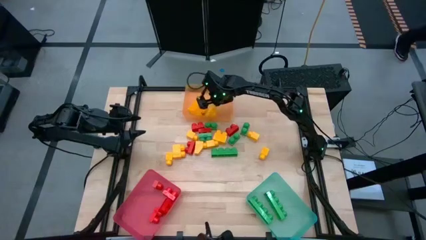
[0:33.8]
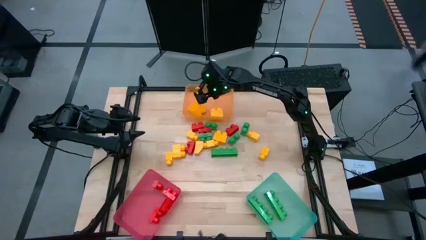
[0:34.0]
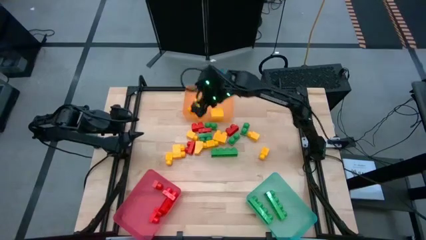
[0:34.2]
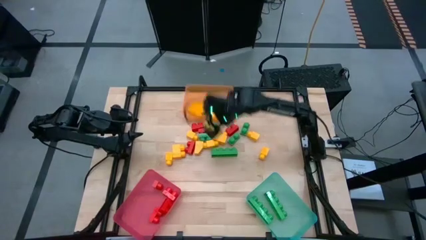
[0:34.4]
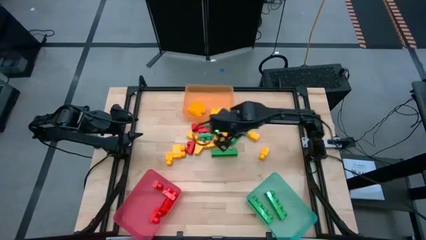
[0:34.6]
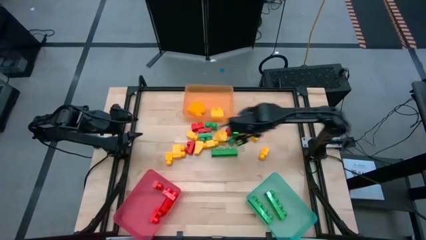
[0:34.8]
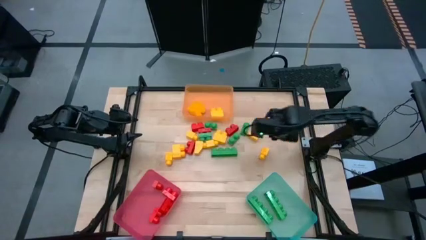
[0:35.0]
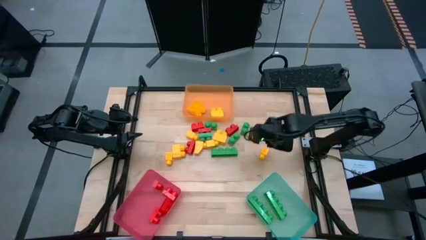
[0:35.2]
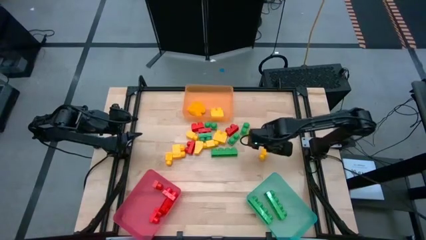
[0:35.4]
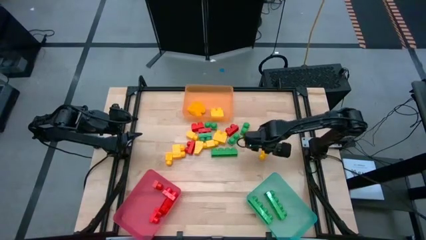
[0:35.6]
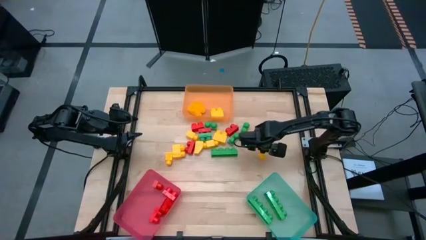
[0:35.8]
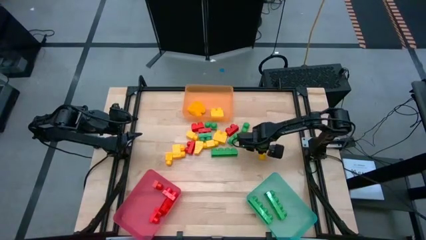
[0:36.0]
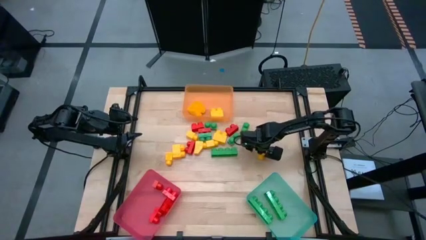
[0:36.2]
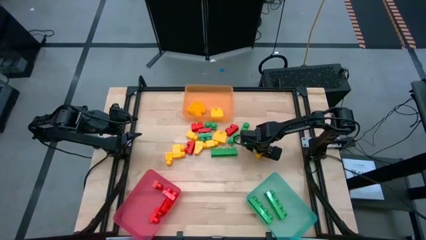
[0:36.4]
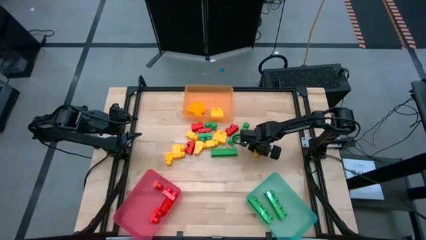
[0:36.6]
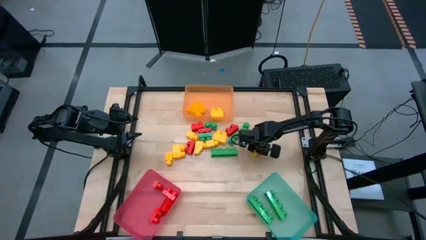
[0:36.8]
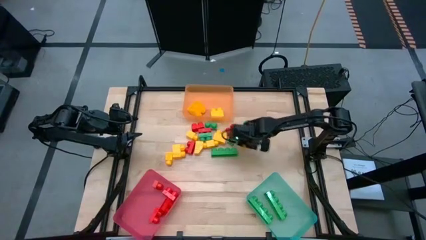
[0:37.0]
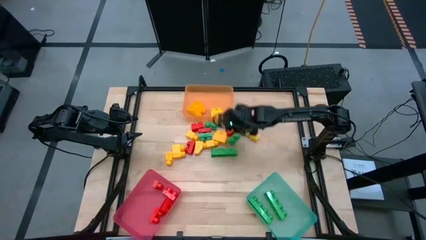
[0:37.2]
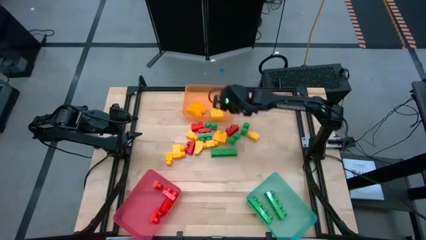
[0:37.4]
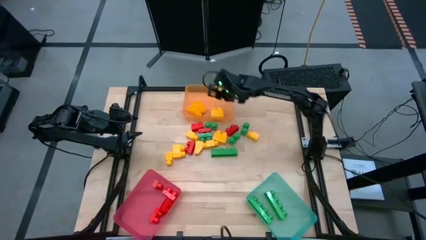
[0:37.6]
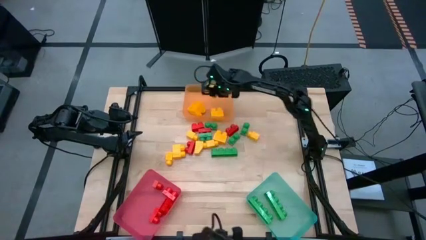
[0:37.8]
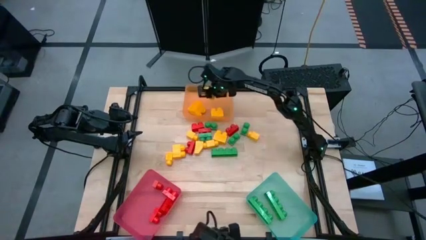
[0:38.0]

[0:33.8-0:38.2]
Task: Sort blocks
Put the yellow 1 stud game piece into the orange bin

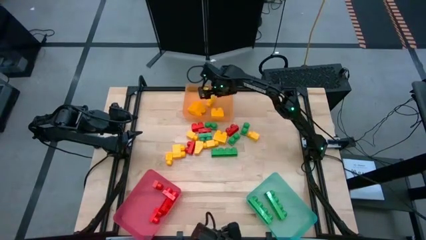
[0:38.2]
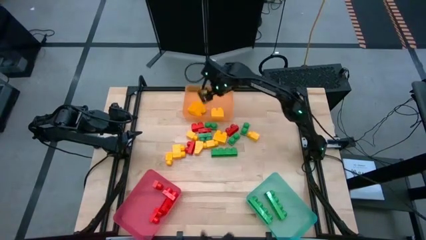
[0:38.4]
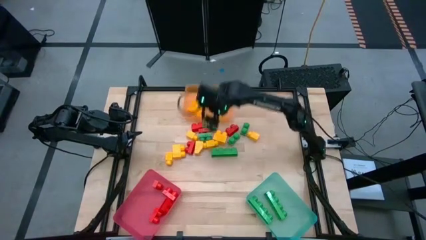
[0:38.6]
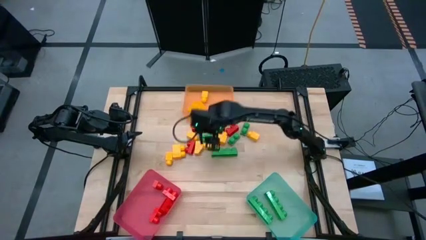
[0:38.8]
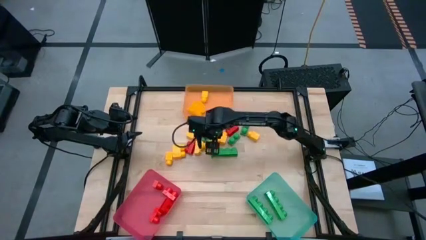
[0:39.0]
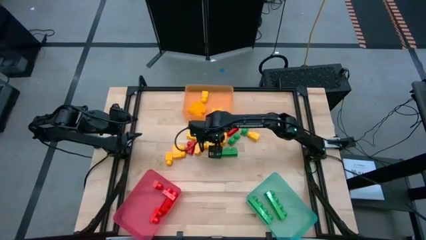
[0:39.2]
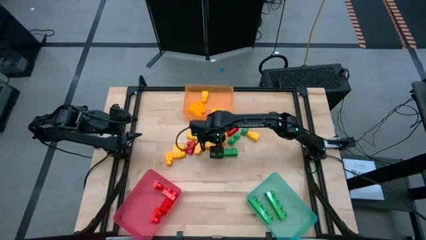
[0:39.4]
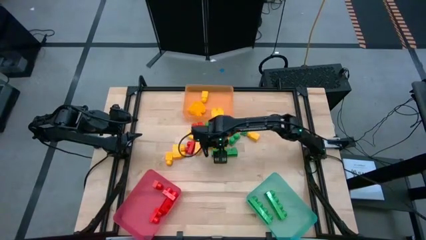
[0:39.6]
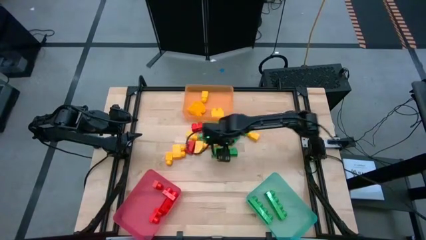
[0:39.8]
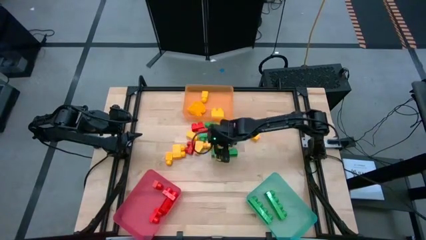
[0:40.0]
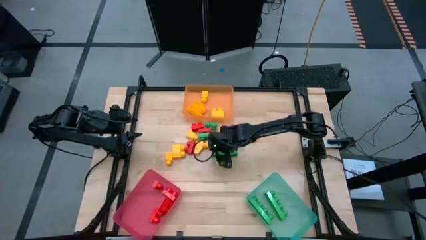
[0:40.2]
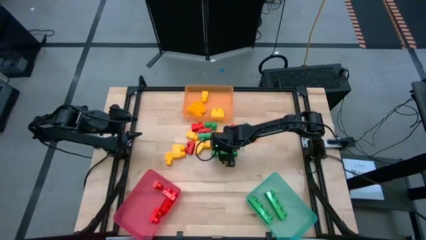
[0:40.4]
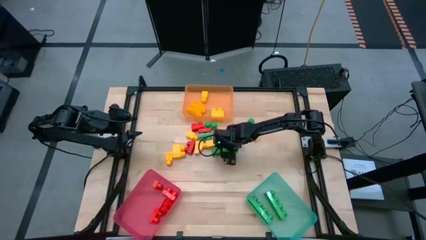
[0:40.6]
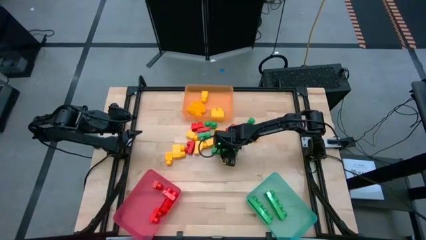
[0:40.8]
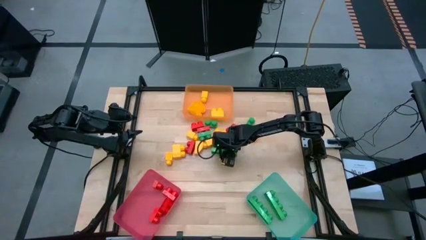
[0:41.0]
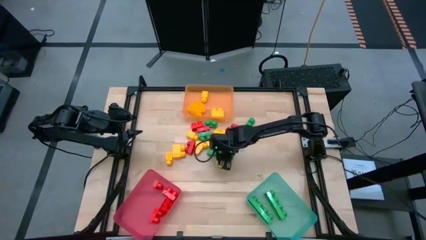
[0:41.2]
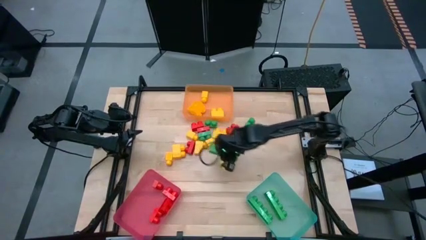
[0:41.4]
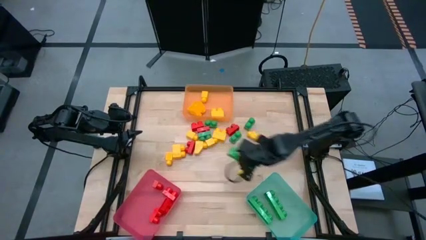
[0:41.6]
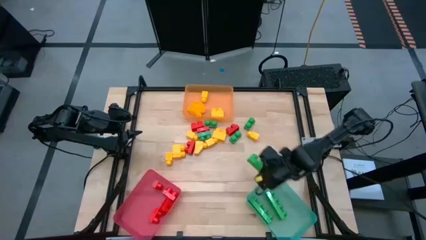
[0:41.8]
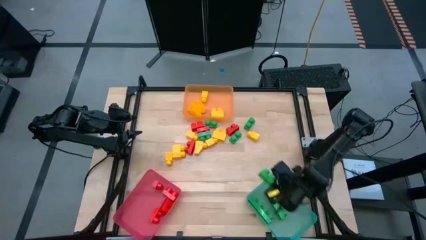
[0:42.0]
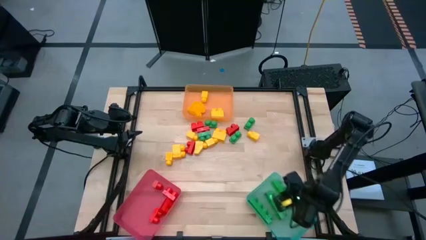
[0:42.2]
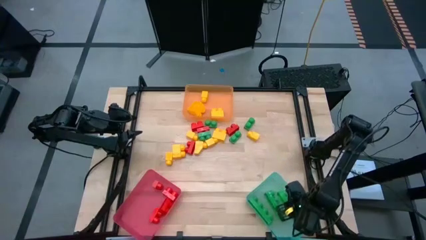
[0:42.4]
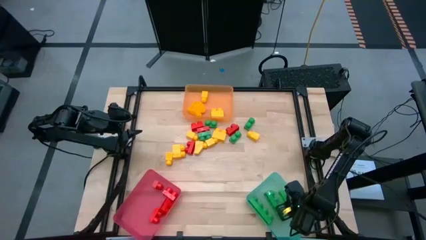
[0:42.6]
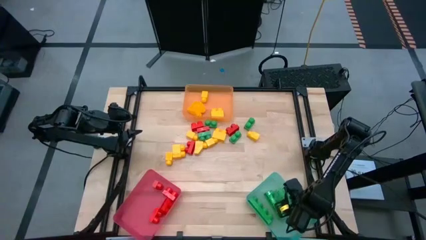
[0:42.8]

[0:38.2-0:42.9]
Put the green 4 stud game piece into the light green bin

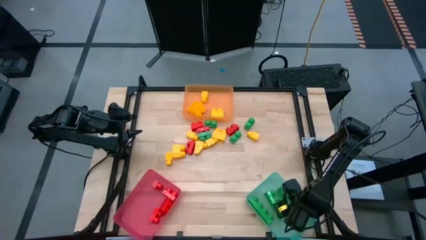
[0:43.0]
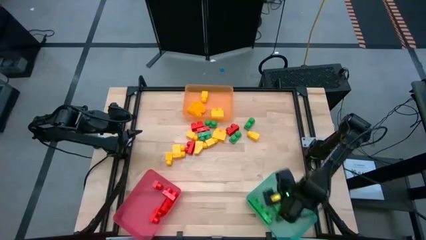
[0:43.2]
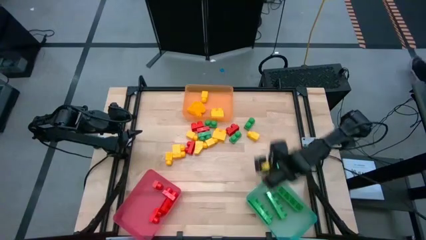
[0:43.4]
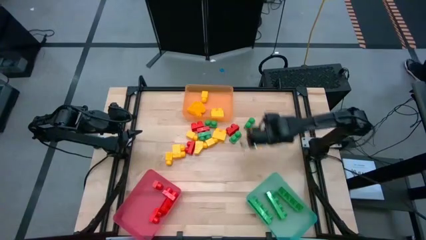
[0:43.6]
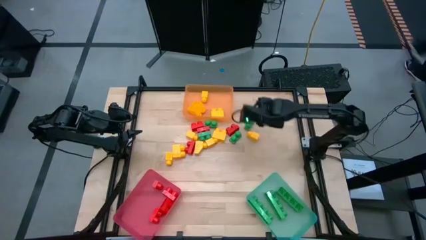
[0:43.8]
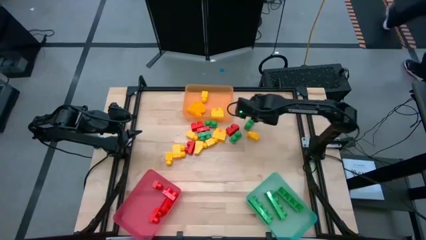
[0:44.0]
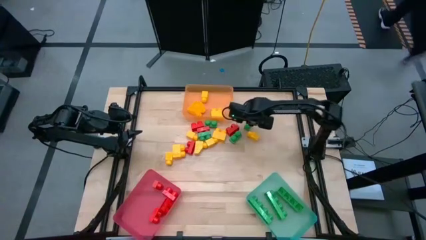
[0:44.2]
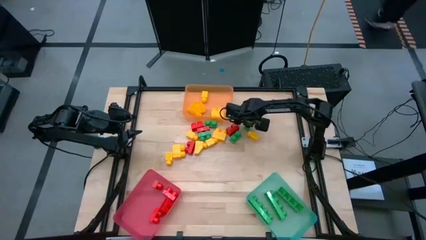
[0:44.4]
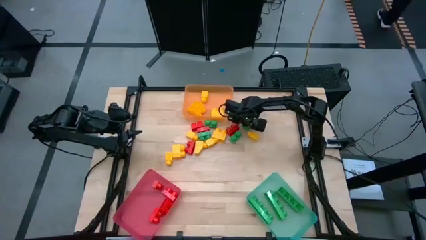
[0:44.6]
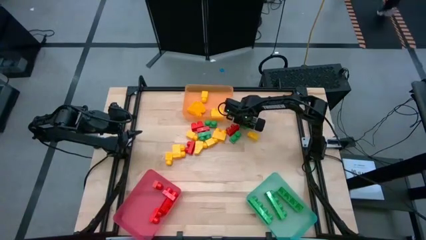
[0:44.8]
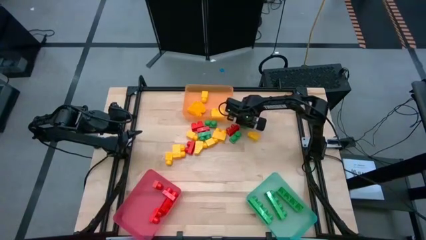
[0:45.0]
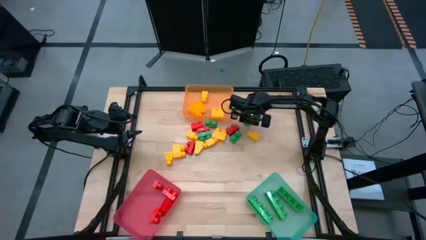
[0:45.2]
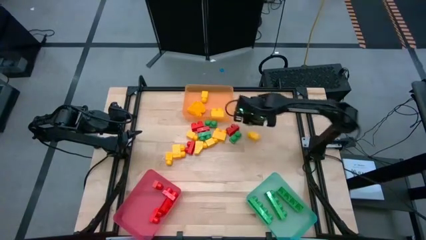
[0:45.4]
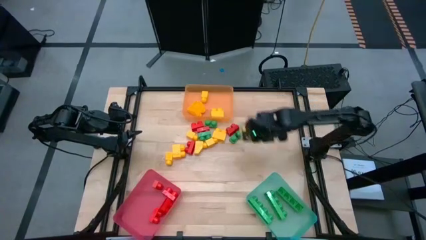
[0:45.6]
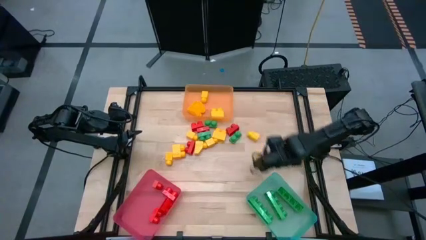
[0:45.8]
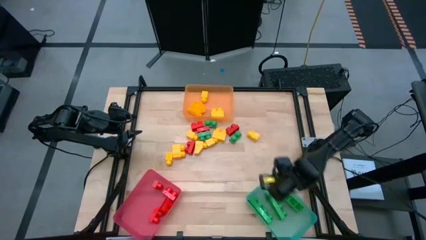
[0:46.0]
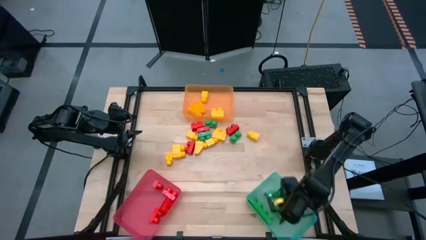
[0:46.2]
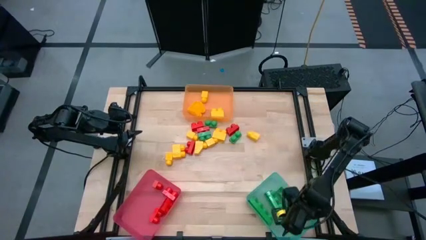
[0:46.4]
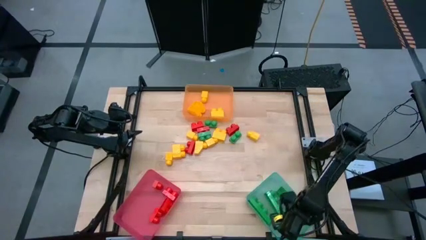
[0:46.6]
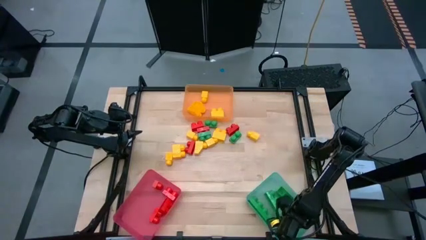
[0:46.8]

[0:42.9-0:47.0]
Put the green 2 stud game piece into the light green bin

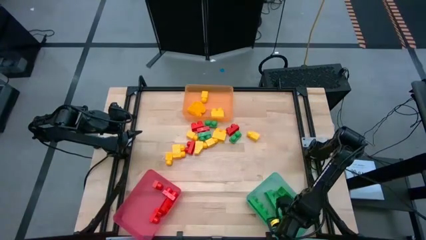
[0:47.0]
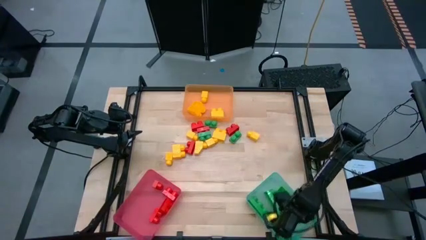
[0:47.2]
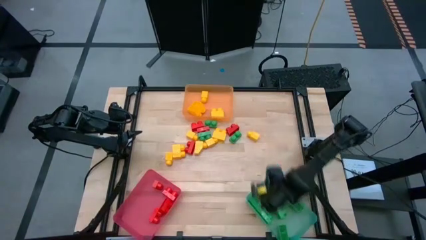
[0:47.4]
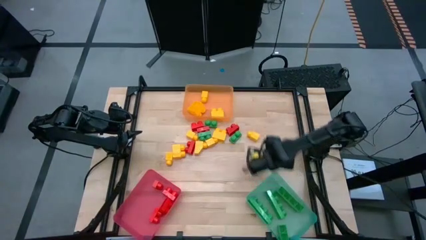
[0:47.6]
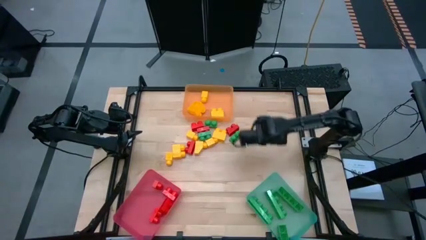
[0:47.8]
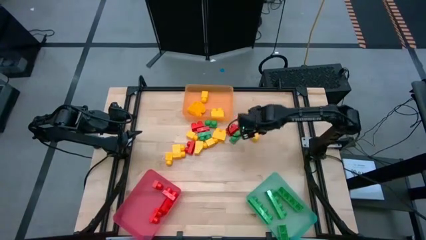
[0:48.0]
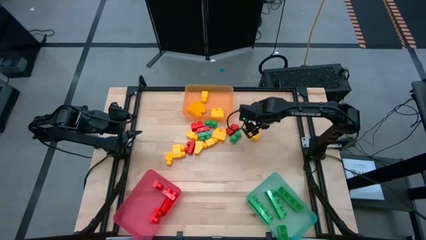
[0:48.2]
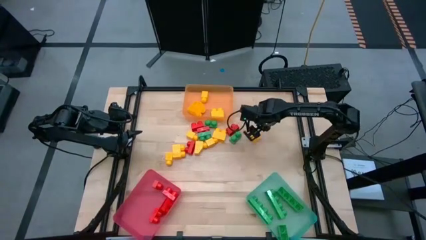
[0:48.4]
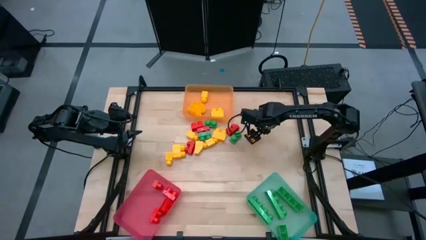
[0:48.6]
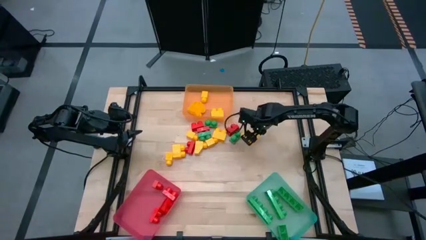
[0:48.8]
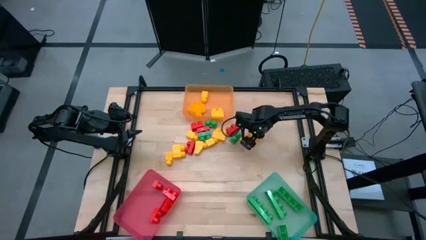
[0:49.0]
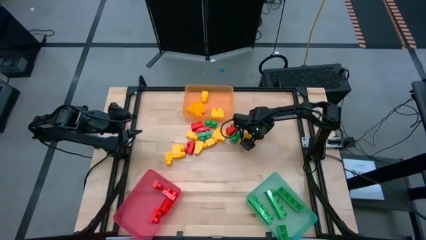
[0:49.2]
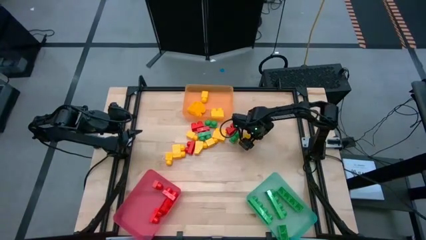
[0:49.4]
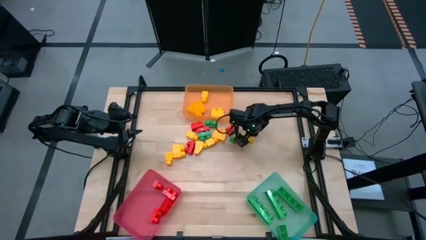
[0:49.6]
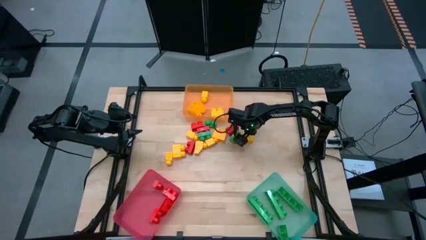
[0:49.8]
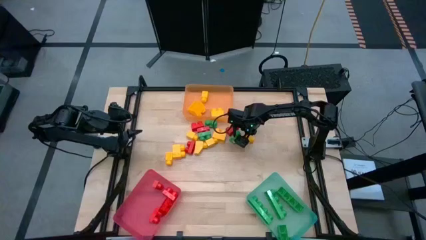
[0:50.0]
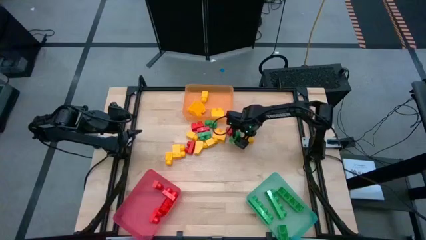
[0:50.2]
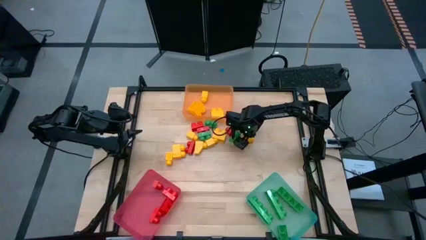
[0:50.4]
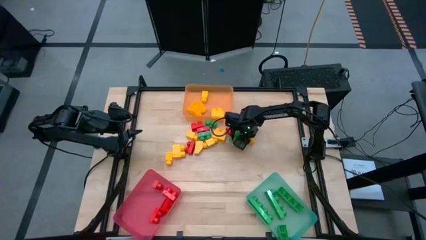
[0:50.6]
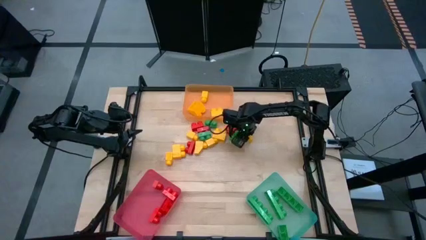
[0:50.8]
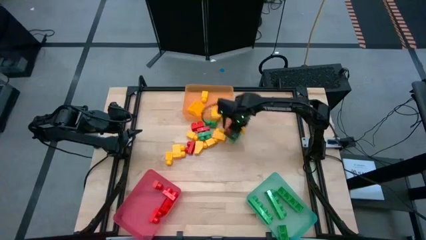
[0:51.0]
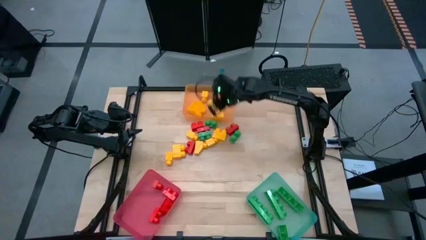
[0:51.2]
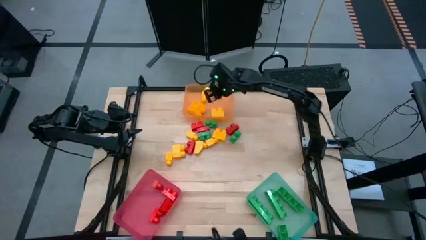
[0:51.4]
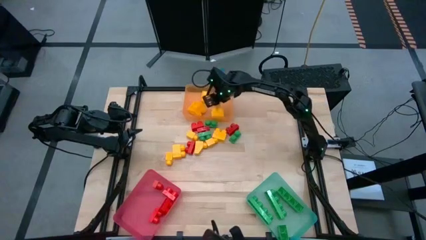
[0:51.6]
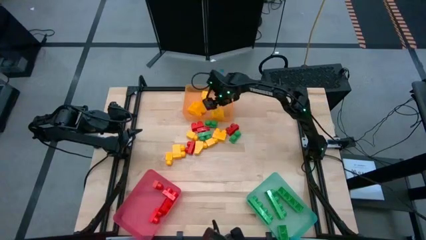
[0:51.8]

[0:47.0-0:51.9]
Put the yellow 1 stud game piece into the orange bin
